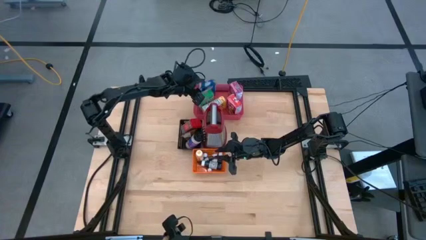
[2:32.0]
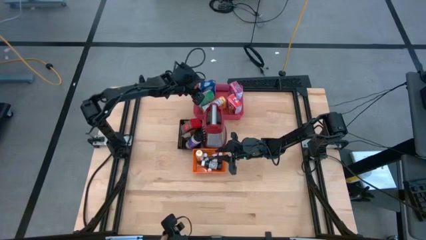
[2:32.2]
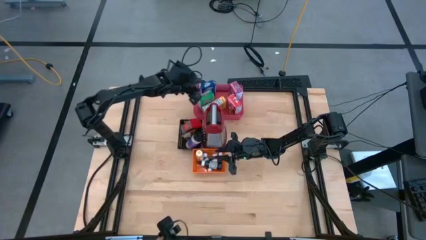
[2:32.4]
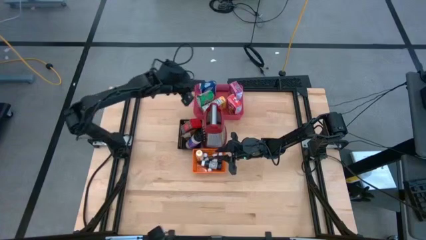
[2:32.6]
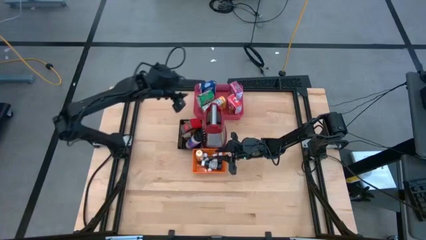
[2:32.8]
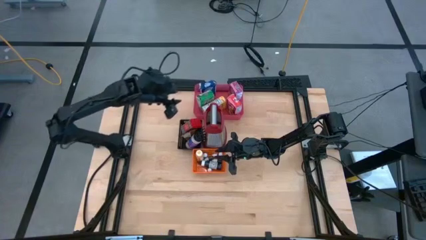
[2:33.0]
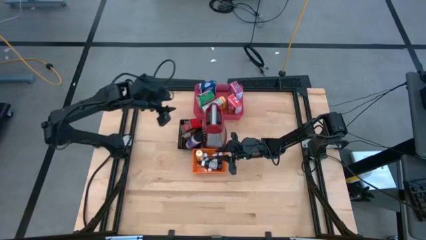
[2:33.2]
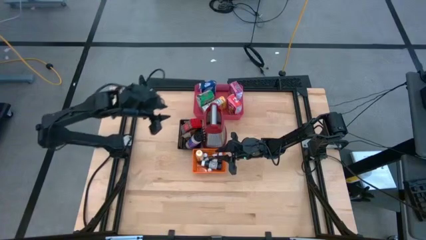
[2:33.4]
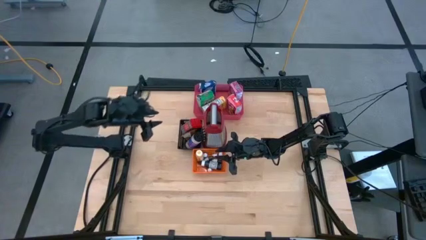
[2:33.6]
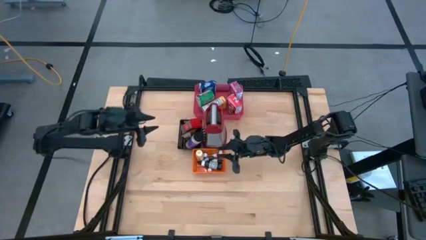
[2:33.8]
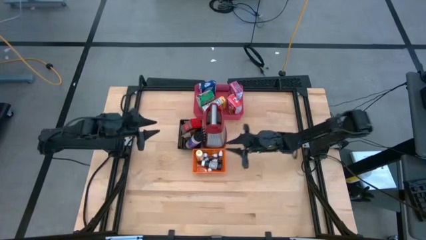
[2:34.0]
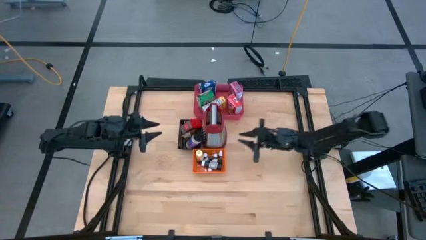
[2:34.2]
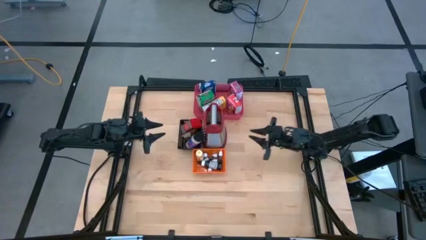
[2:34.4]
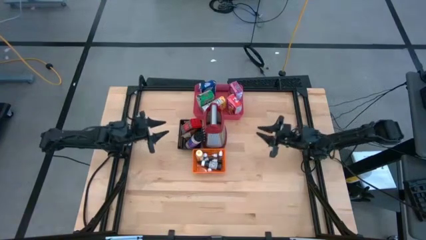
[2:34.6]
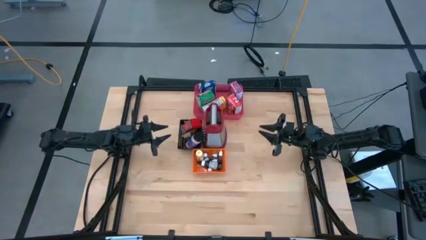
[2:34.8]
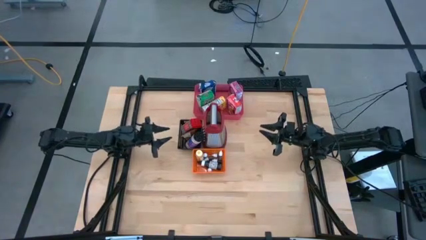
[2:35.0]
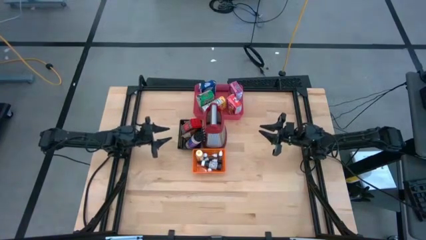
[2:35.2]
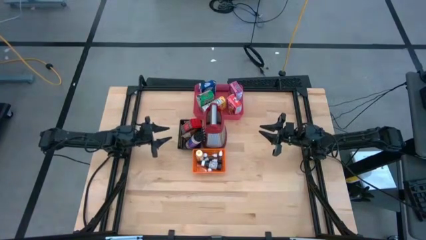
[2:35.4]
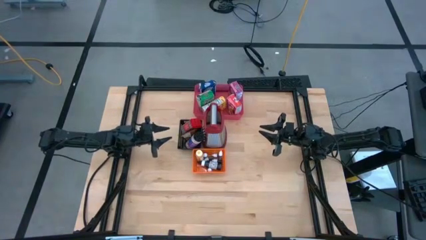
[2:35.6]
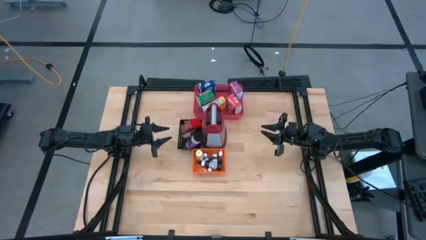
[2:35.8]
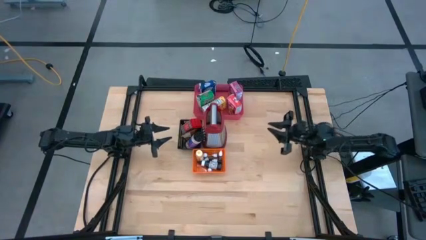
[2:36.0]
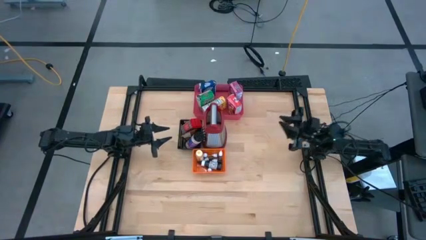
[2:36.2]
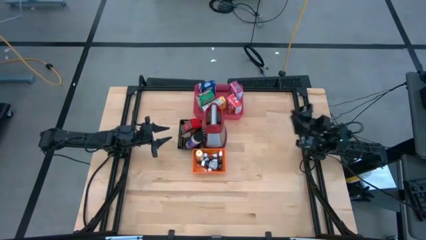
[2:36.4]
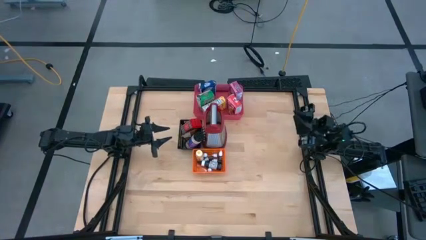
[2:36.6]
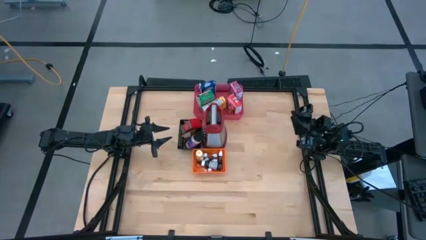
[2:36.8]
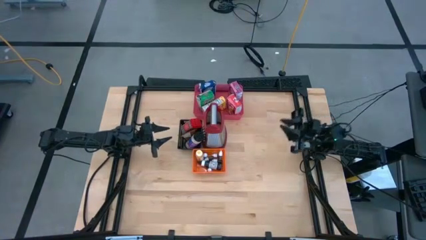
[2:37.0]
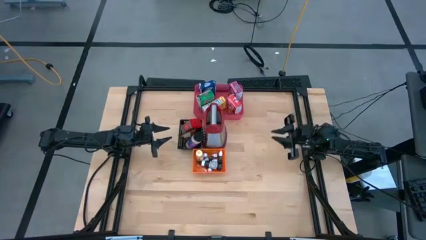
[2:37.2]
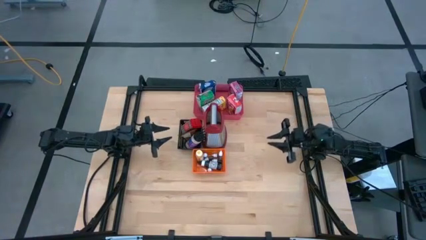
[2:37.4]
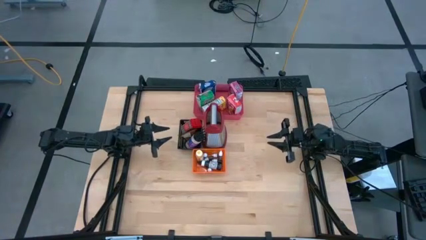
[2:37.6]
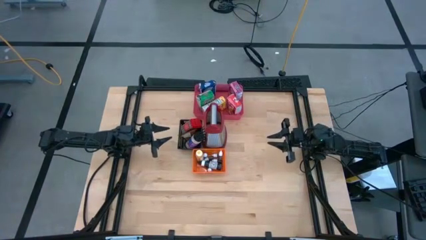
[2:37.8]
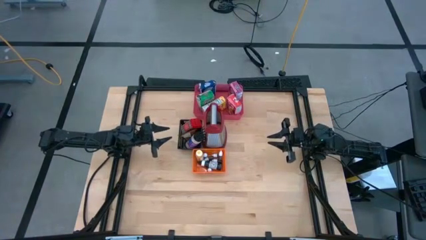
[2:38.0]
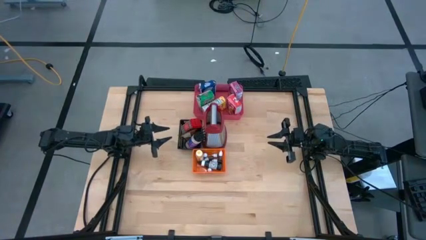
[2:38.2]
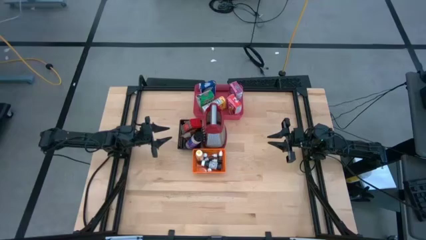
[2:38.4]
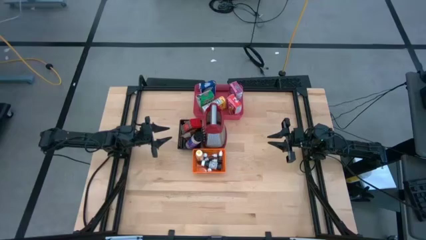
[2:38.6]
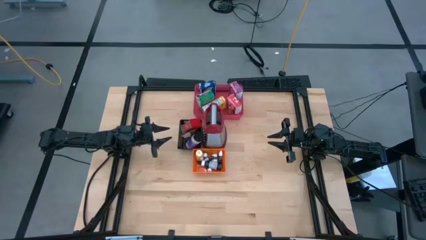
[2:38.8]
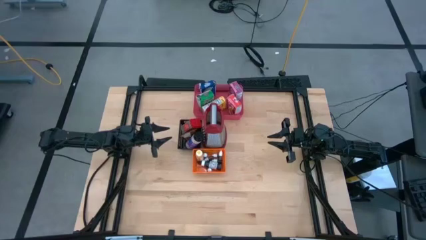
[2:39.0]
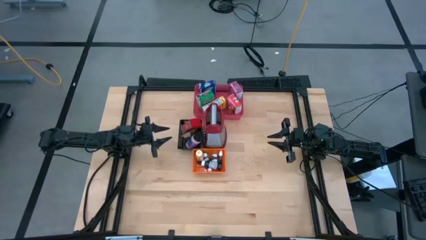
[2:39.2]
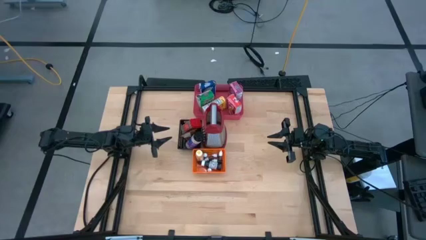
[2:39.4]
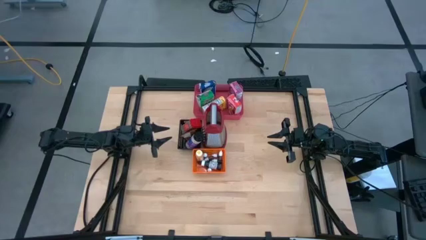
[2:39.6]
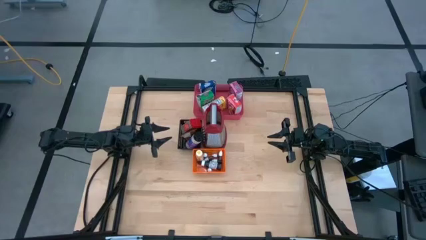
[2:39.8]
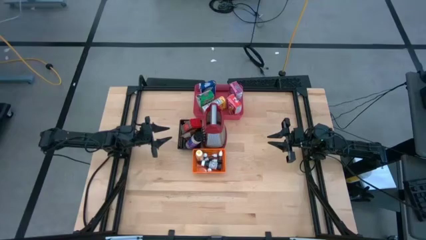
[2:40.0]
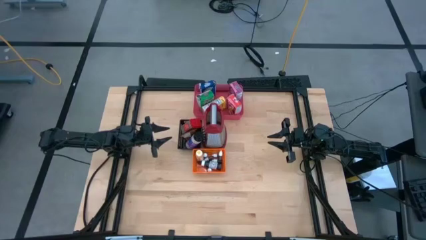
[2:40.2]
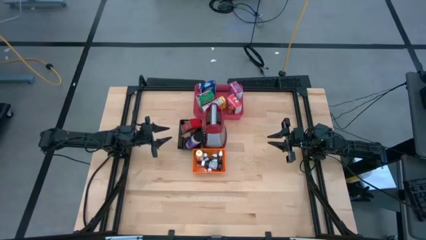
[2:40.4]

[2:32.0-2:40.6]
Task: Pick & Place Kitchen Items
Return to Home Position

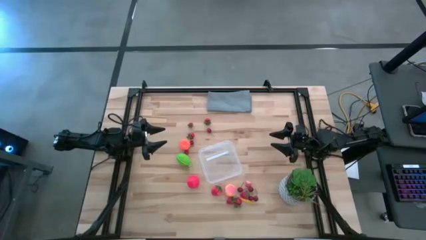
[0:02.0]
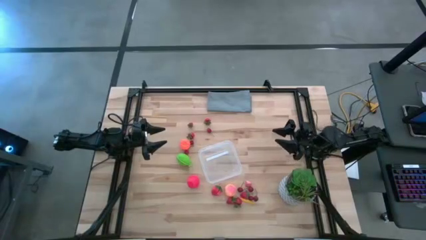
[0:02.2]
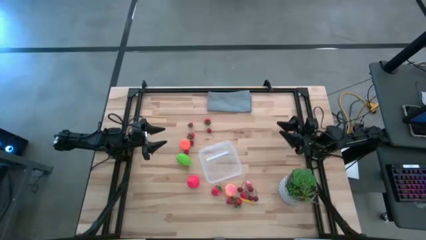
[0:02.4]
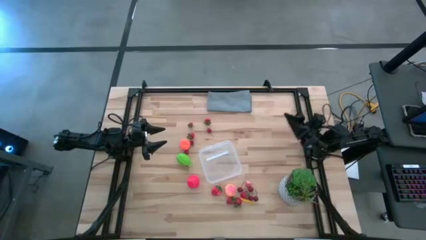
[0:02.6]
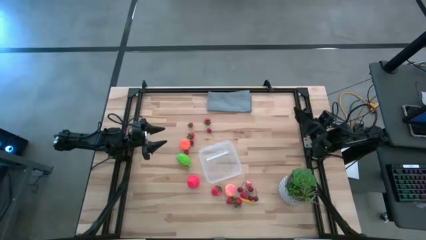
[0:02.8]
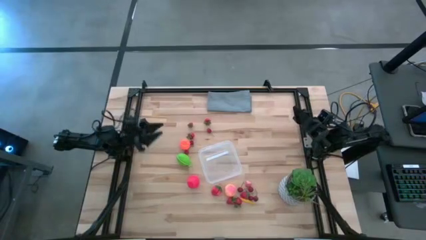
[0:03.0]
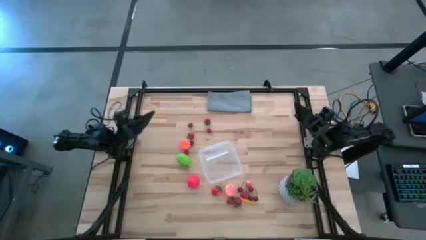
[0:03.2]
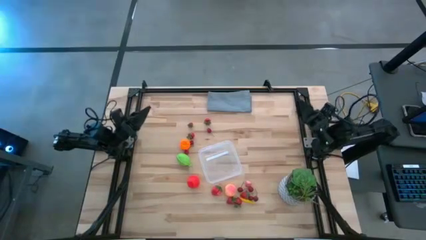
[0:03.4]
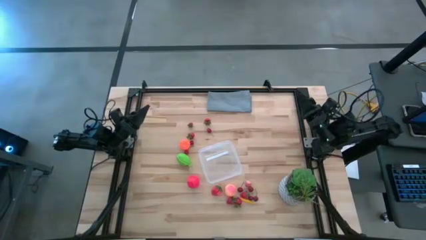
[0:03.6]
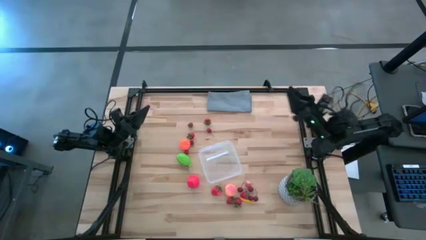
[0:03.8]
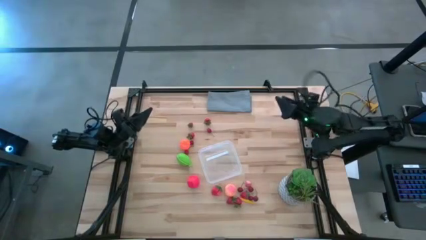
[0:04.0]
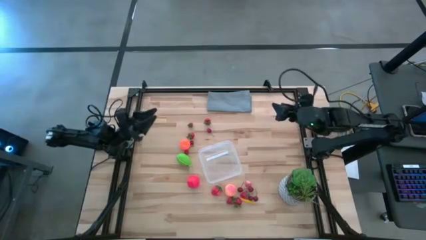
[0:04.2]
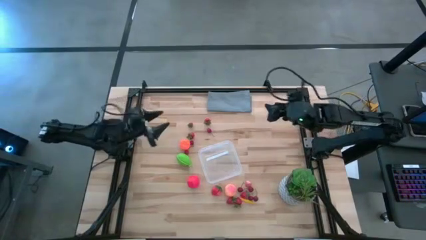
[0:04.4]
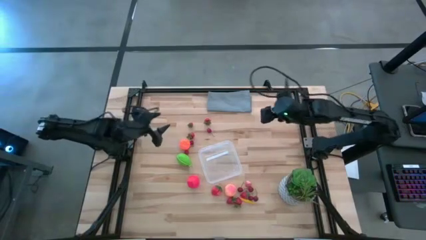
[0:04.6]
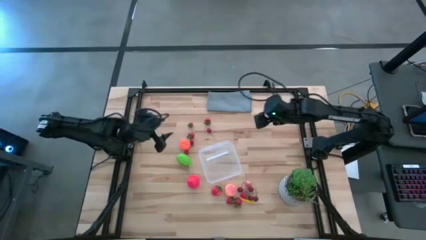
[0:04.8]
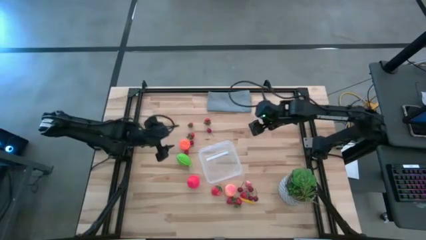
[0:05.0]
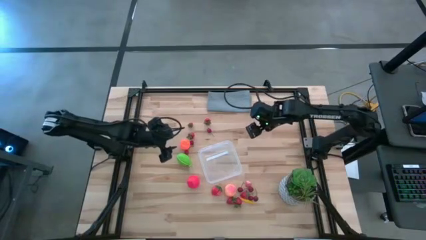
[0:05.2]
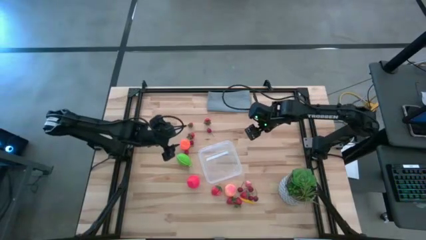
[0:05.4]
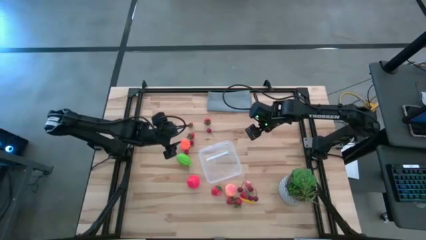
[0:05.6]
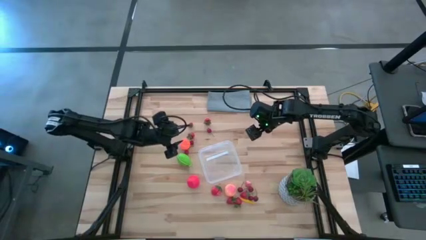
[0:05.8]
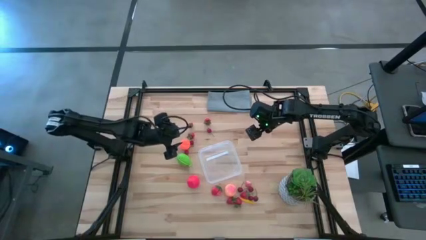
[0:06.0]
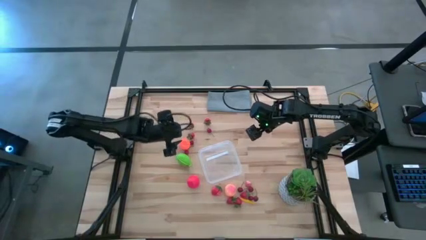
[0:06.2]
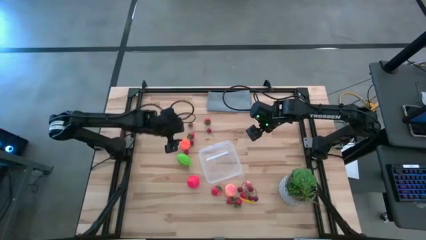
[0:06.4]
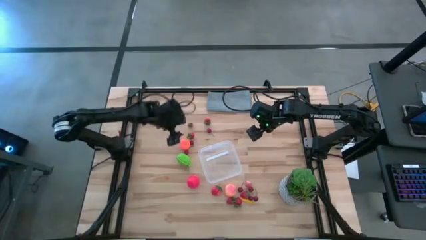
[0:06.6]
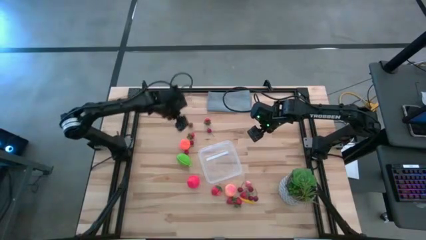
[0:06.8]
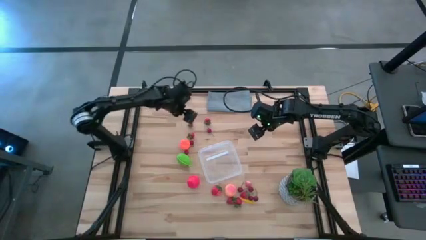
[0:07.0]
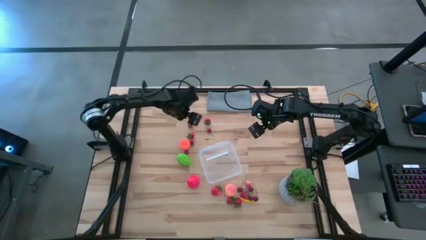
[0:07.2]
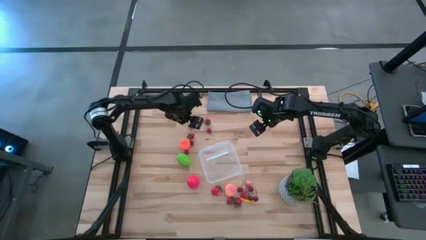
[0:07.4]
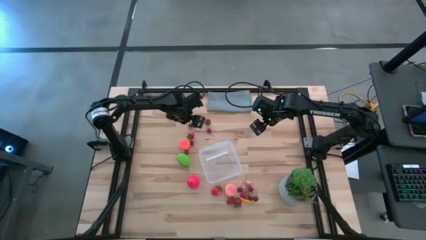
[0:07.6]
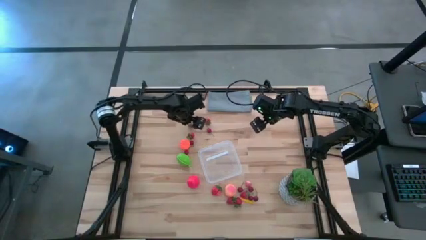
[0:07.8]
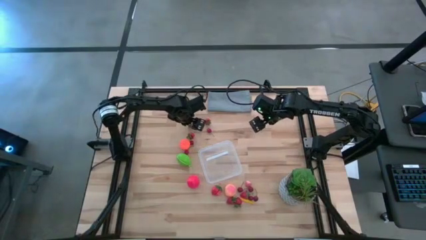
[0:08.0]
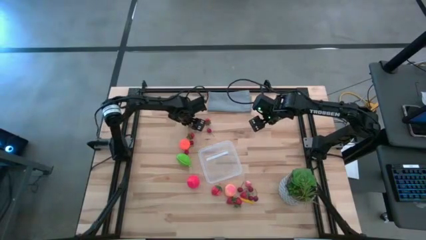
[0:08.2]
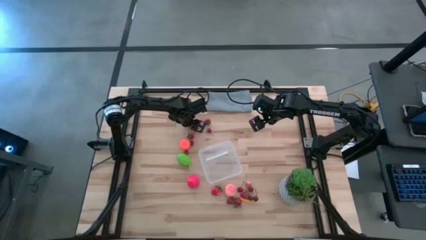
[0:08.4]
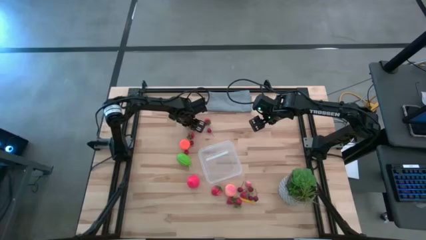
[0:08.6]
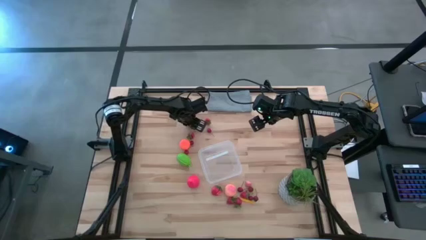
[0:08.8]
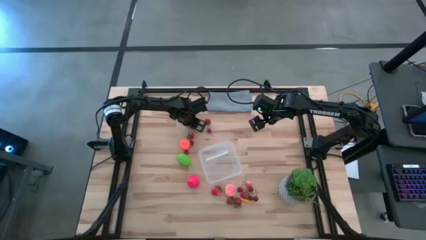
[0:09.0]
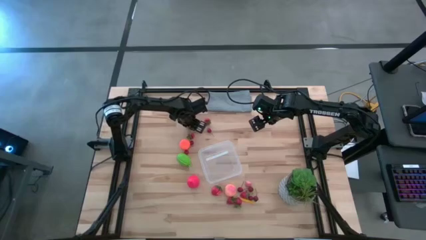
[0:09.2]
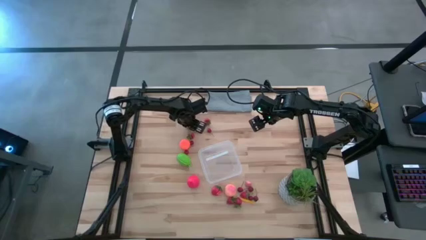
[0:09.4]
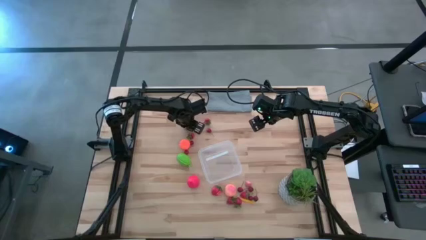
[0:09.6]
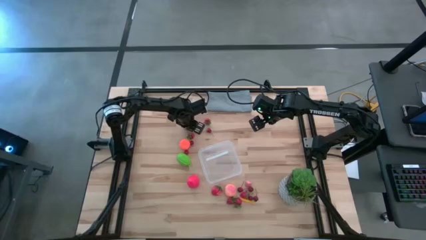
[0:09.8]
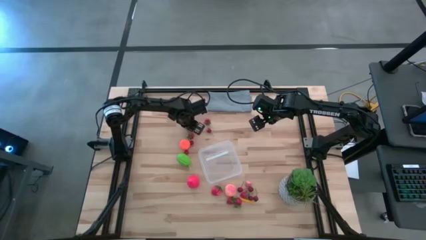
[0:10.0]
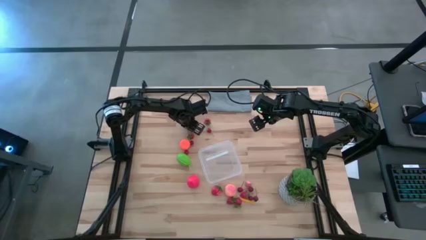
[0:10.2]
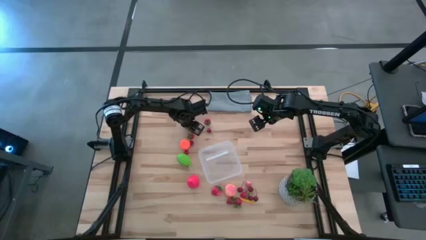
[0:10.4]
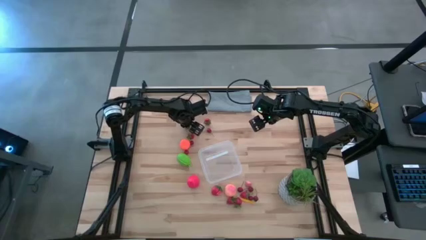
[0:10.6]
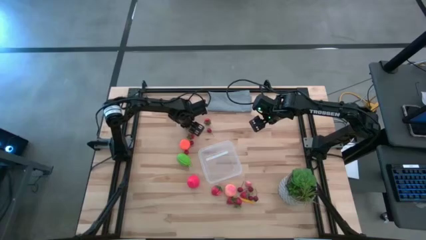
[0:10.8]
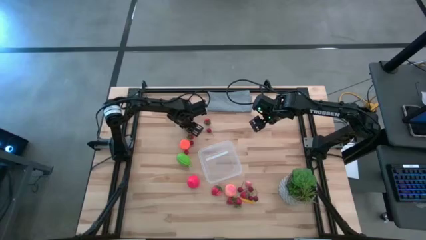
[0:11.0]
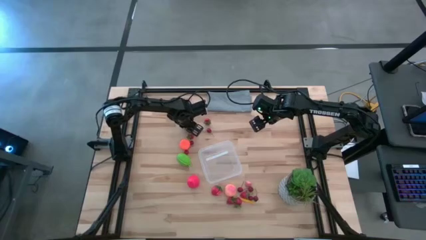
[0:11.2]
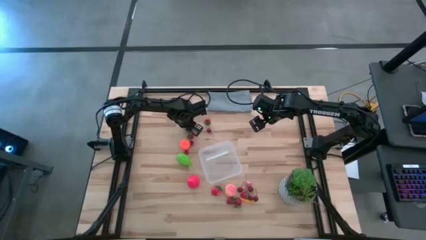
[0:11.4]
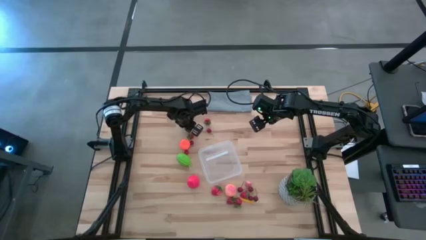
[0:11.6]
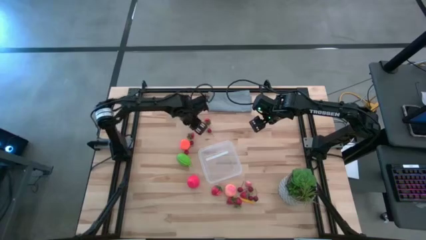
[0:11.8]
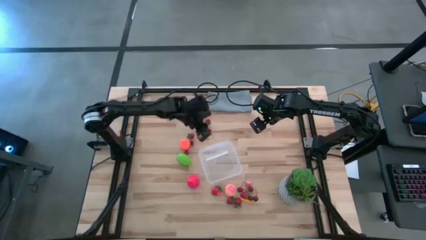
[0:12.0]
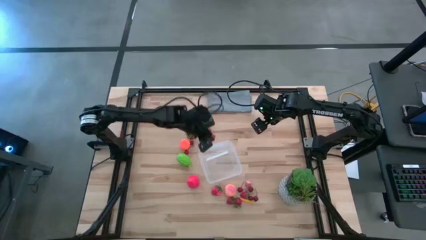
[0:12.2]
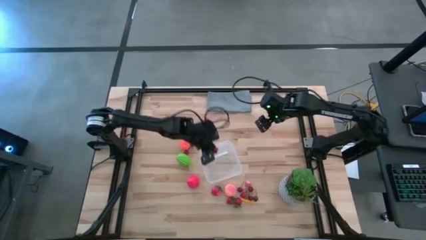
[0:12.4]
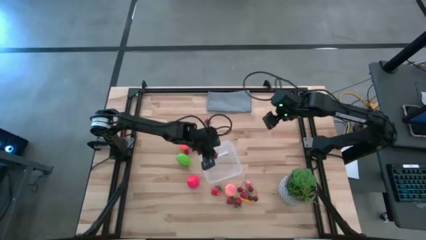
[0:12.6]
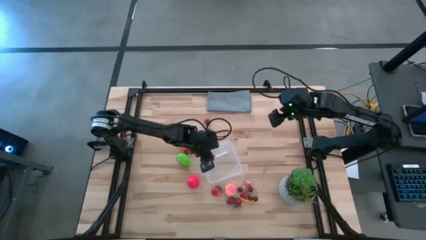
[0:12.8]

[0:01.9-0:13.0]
Task: Pick and placing Produce into tupperware
Put the red strawberry into the transparent container
